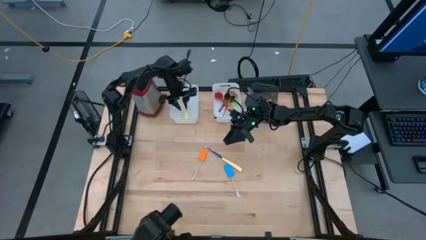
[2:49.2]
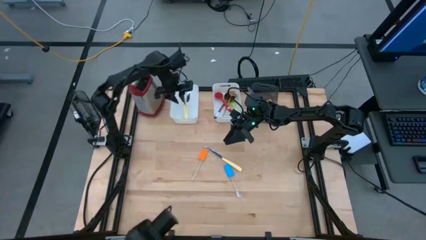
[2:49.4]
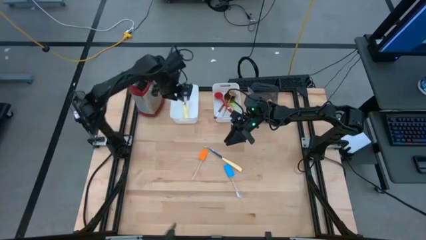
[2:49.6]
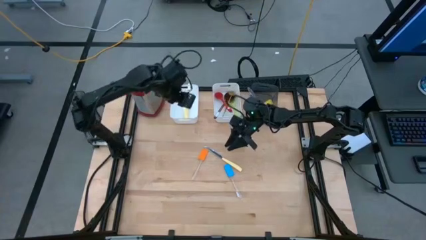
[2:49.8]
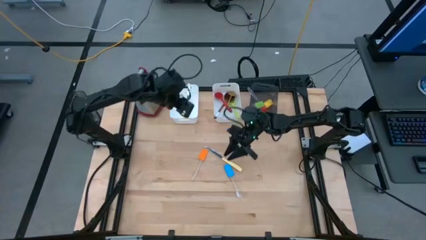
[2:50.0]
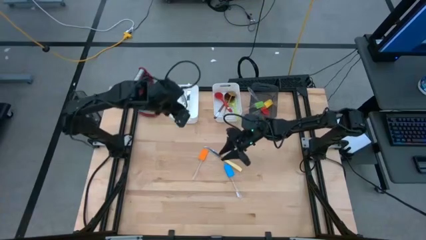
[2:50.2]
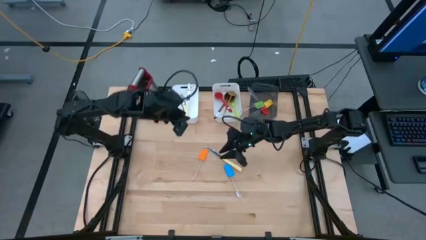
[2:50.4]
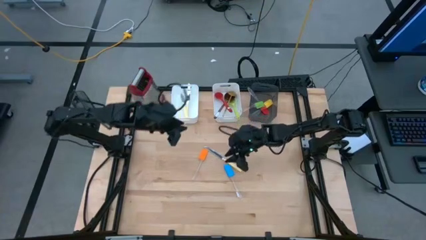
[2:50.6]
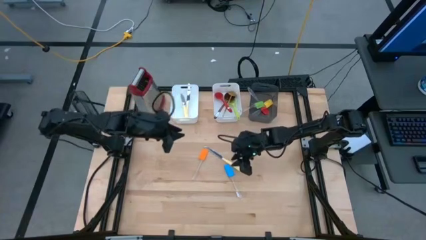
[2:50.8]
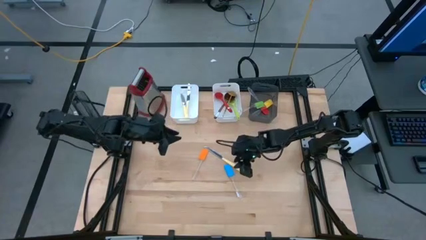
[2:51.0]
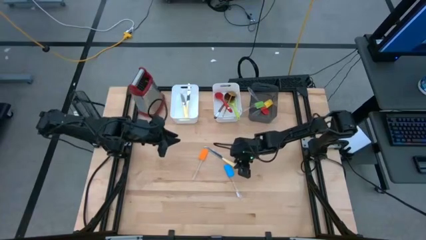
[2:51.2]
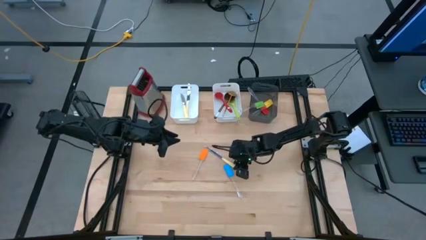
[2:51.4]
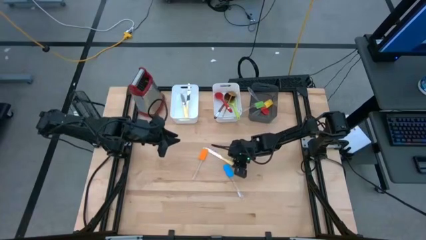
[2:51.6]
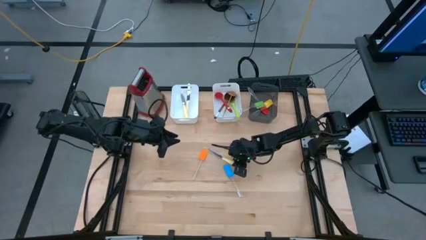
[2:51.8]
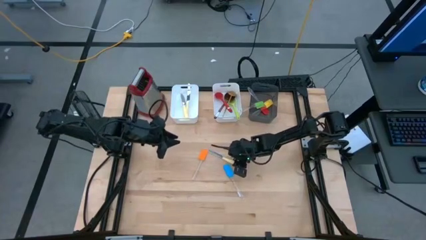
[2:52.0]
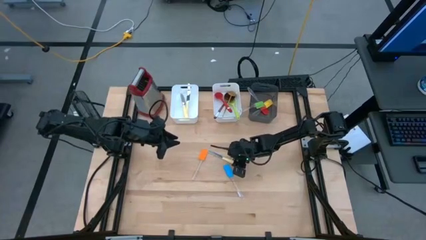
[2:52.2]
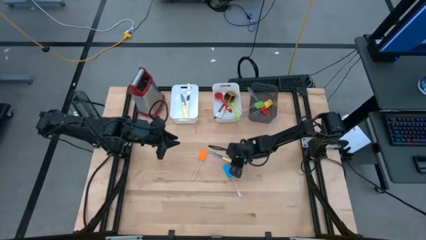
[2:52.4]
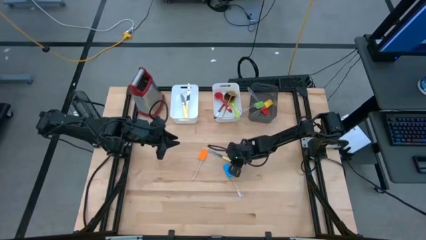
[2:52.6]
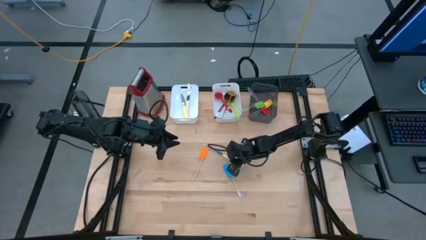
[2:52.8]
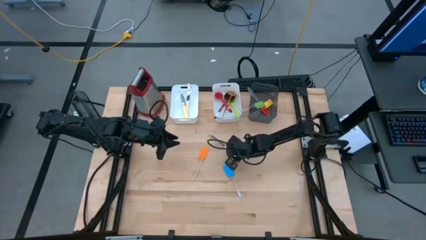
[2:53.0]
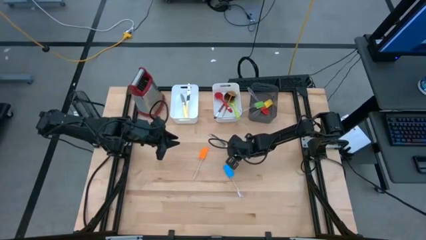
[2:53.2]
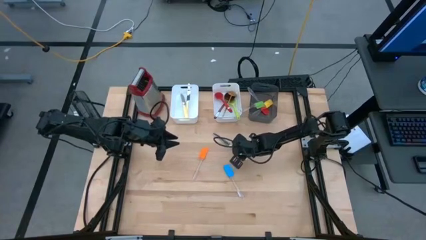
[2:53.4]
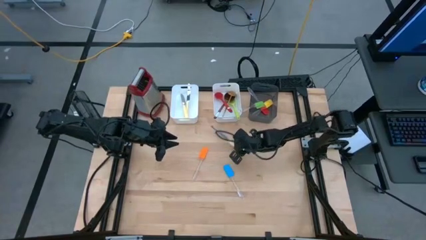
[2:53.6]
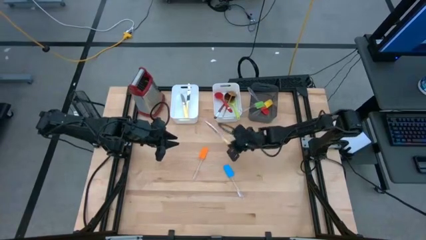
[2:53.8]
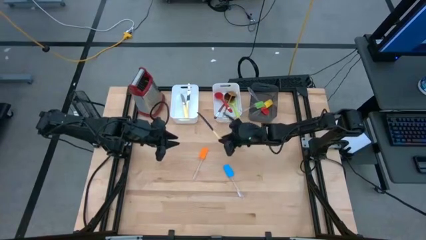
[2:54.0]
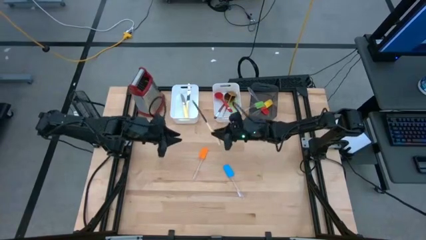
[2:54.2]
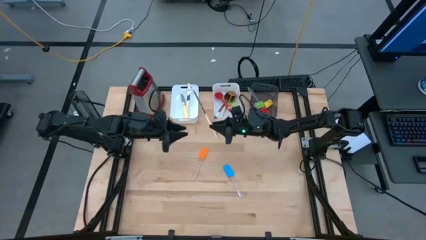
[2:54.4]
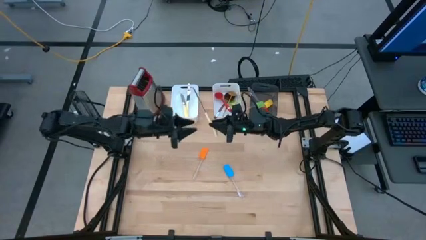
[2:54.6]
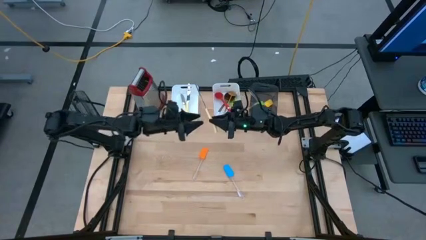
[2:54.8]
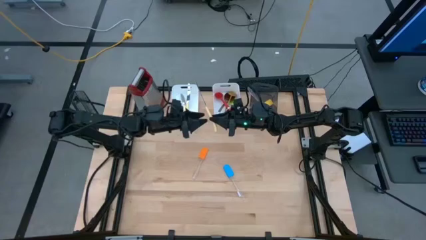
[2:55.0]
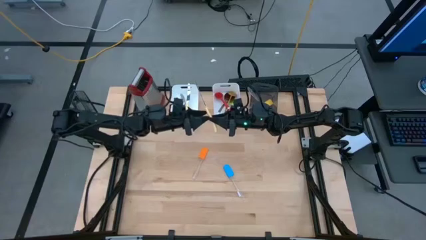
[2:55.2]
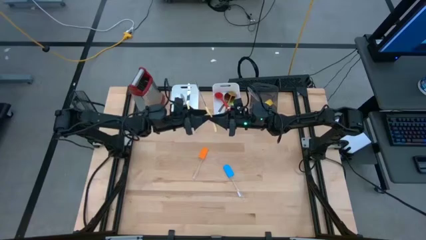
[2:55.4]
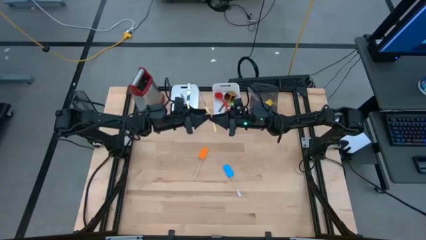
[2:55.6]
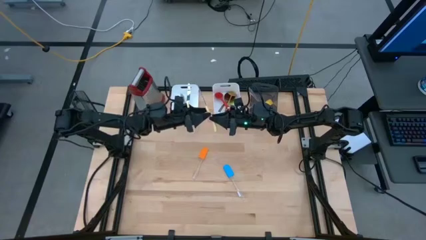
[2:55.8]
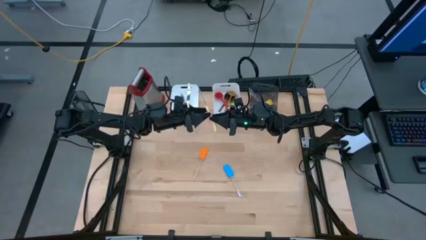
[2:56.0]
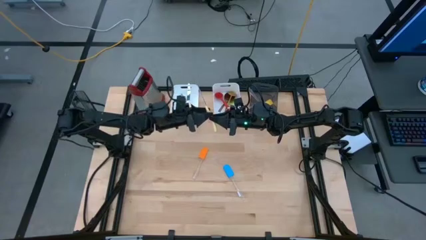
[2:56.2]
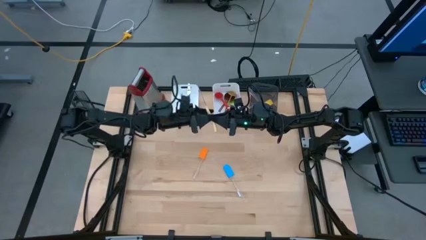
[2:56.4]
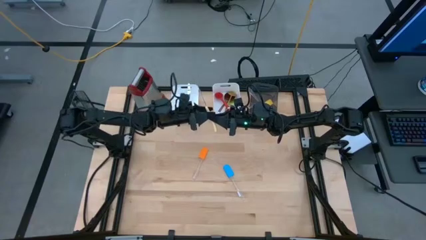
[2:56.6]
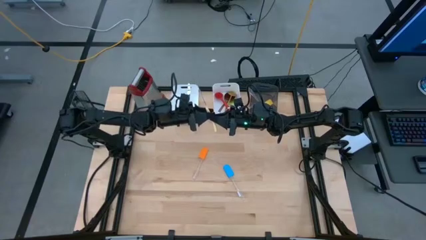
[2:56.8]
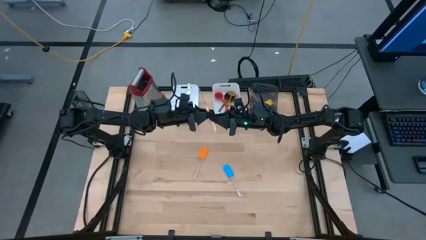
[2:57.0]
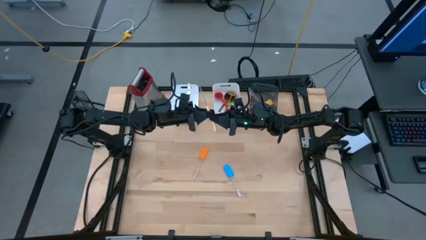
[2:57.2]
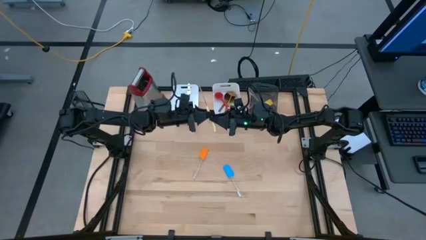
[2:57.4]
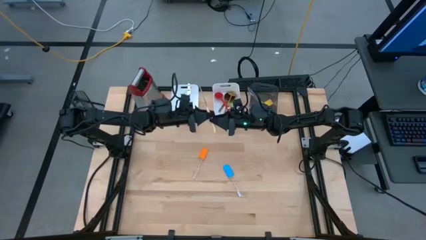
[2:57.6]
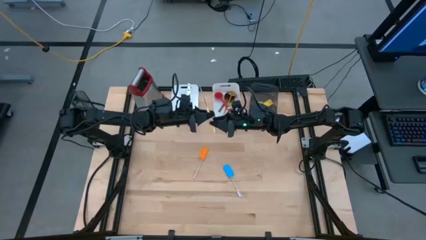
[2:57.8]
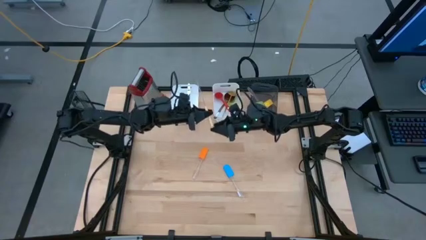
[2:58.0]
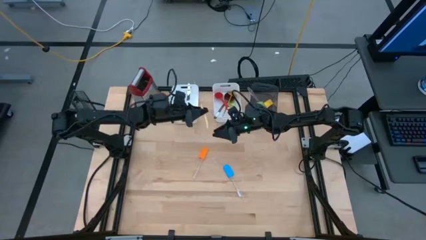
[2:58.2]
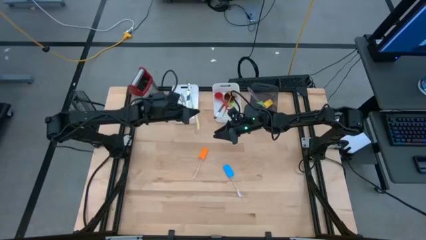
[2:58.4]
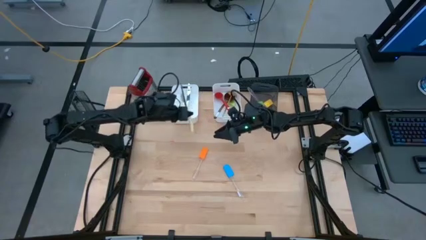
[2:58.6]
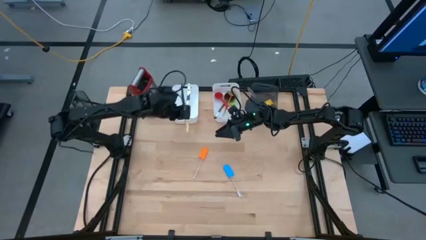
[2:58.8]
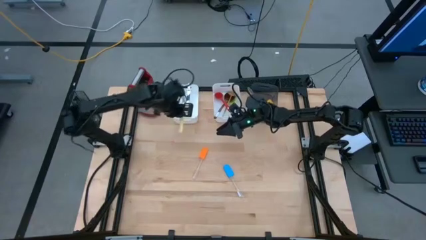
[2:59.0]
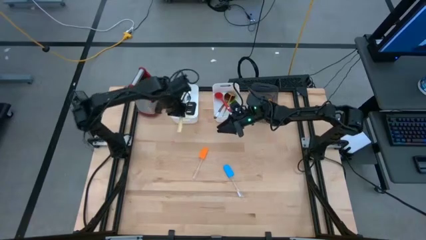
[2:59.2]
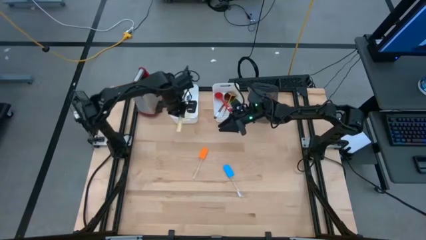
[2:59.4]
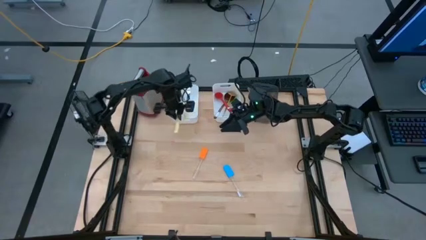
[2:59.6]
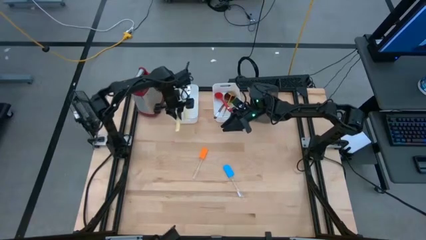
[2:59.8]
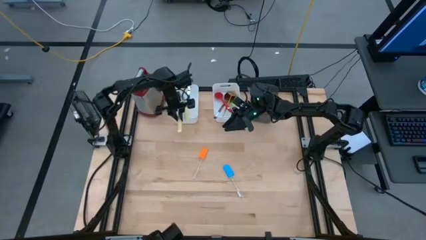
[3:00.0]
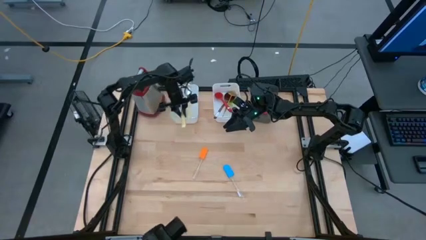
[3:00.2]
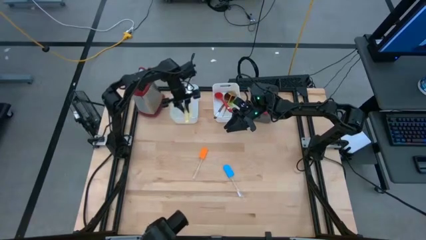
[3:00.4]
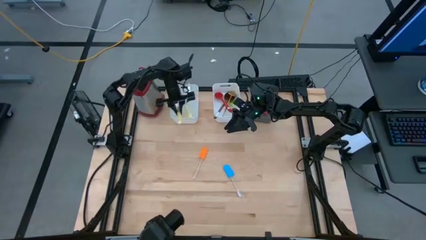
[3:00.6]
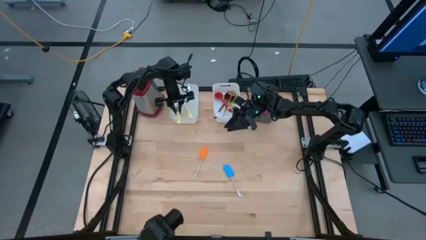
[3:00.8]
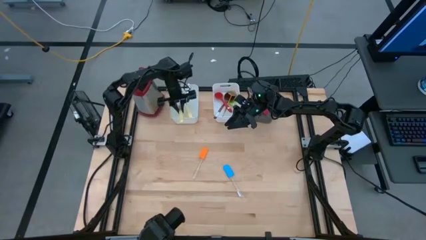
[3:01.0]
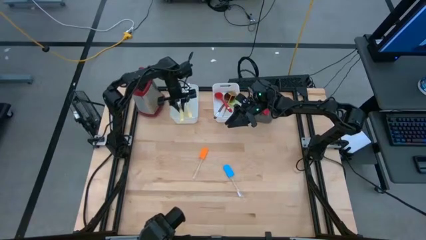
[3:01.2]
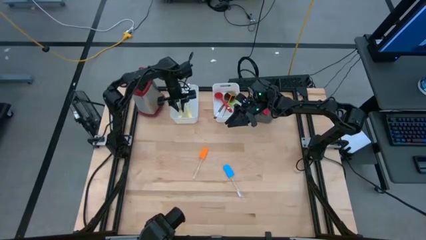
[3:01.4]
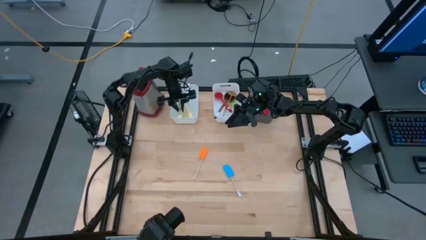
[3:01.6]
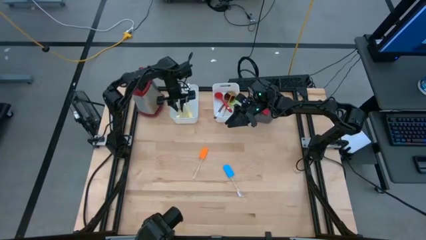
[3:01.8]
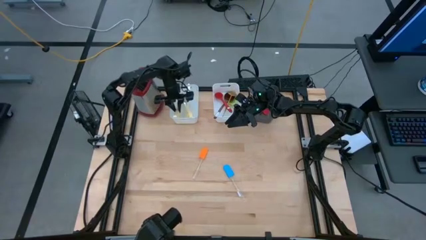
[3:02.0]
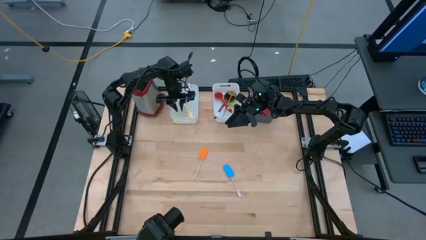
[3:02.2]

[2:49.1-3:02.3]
Task: Pick & Place Kitchen Items
Put the yellow knife into the left white bin
